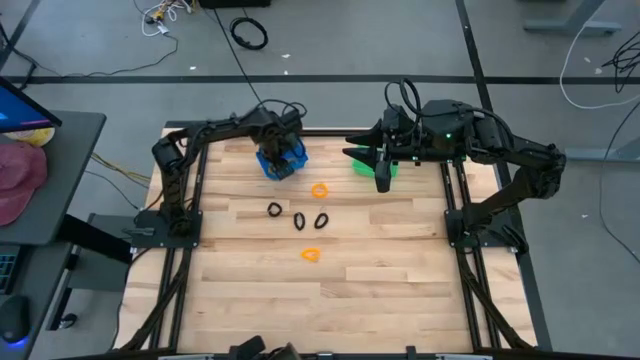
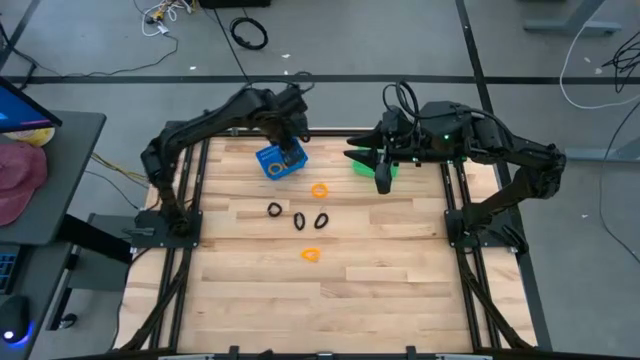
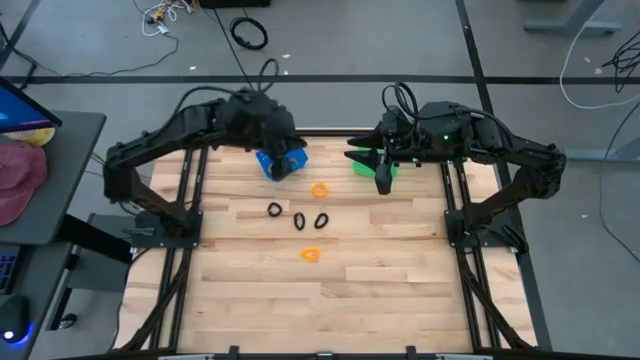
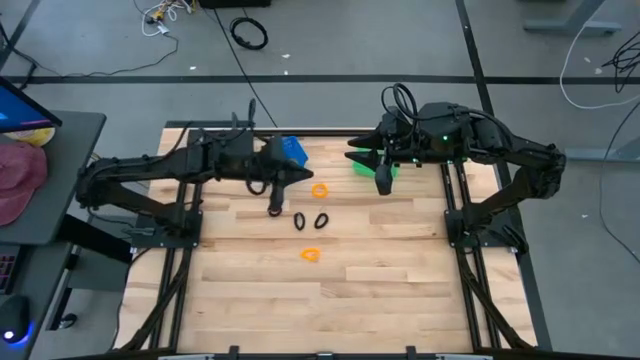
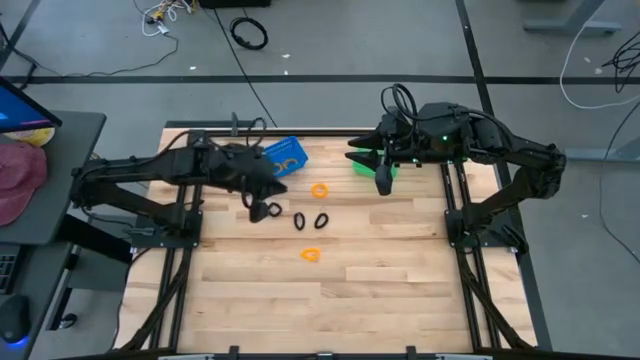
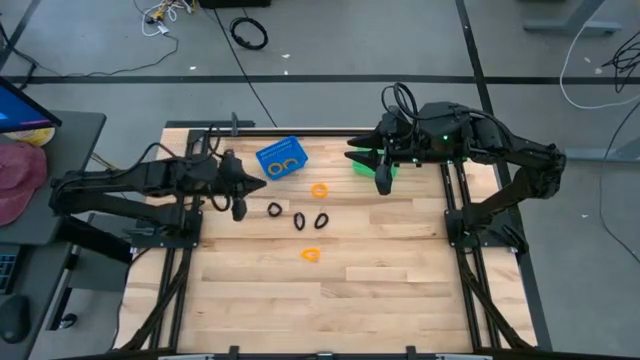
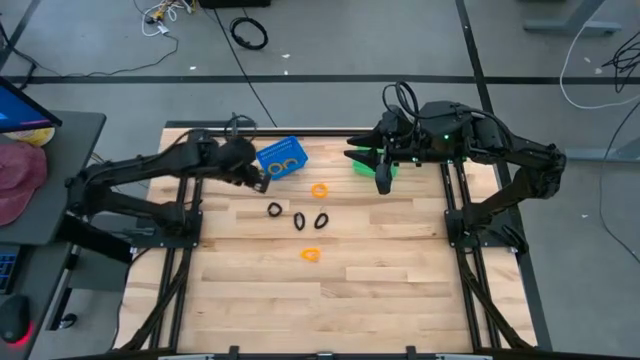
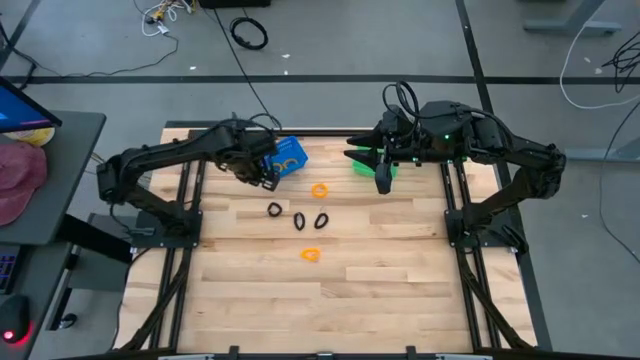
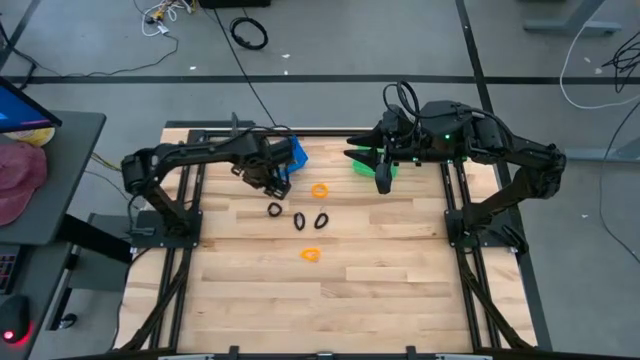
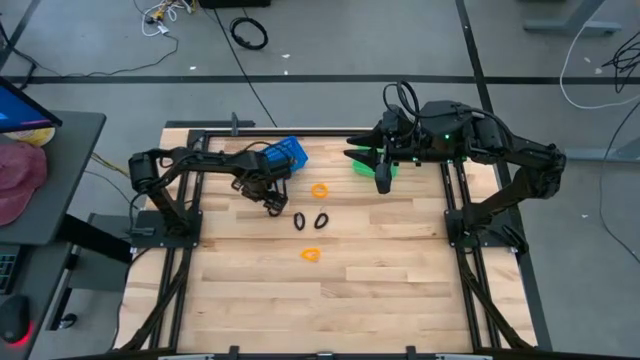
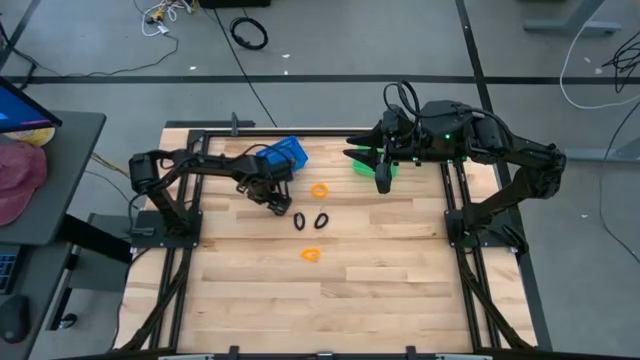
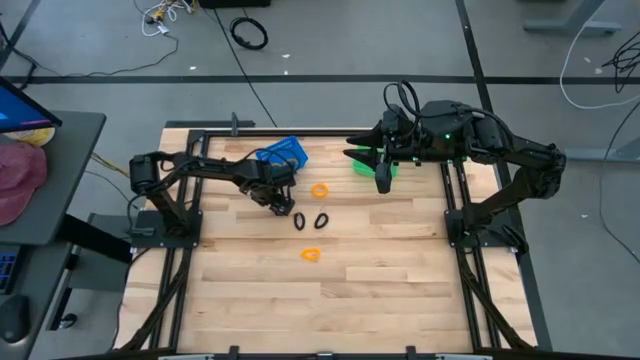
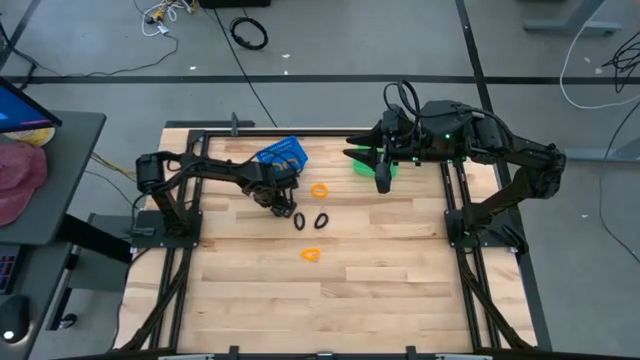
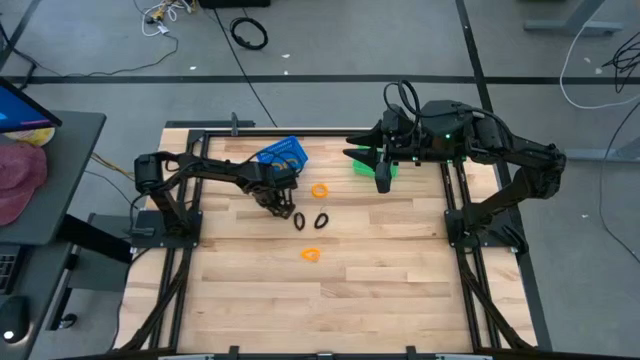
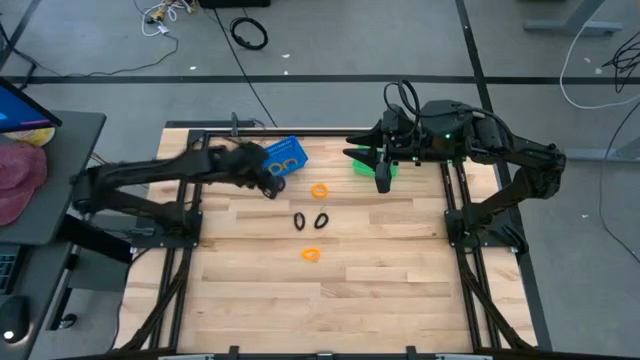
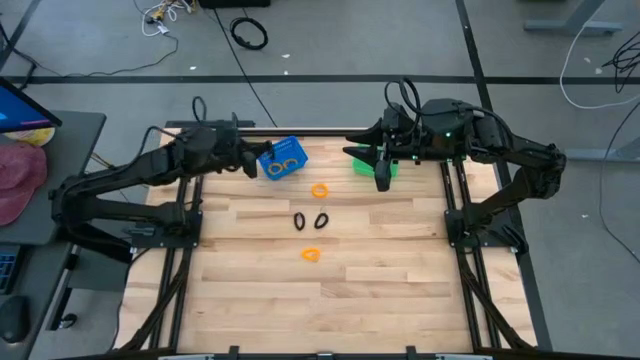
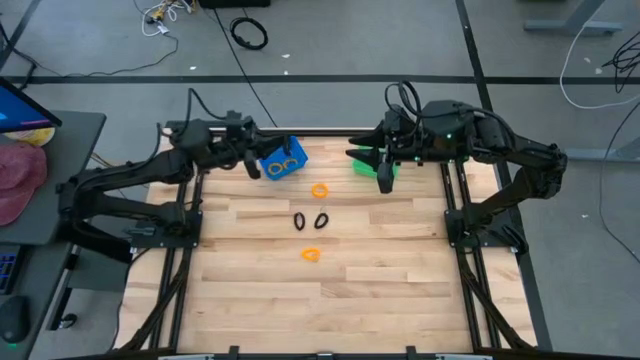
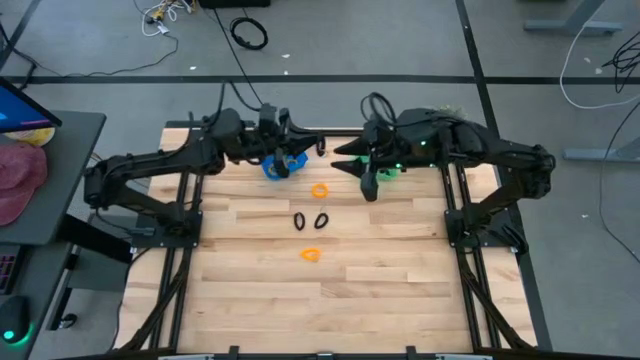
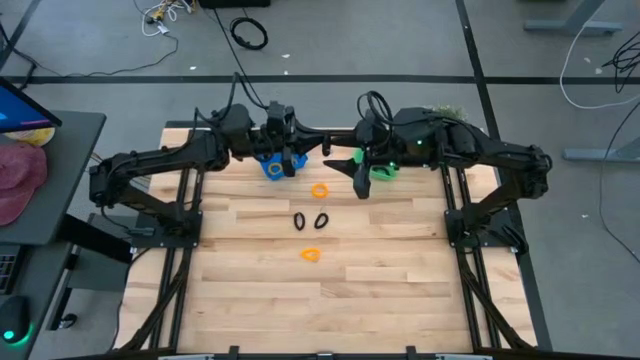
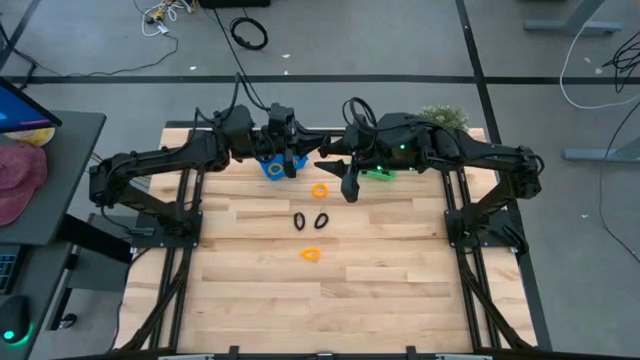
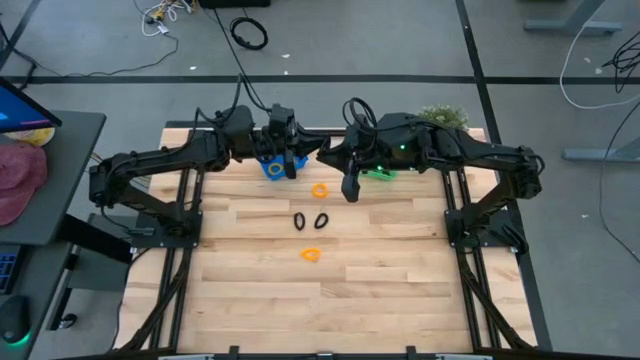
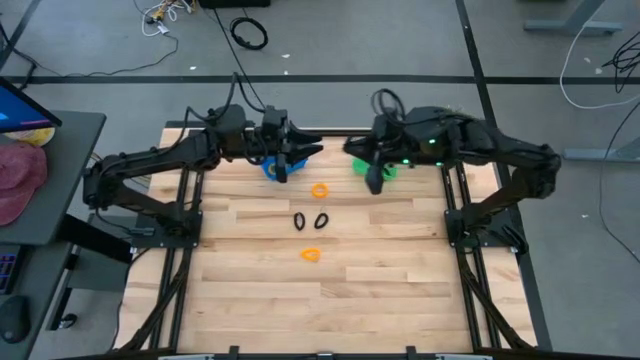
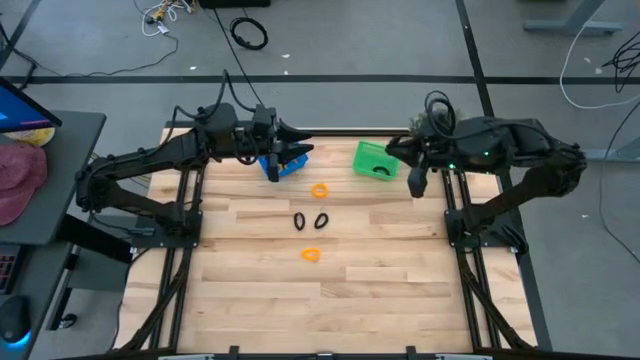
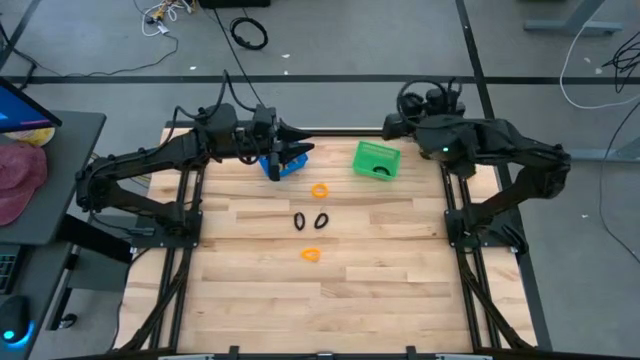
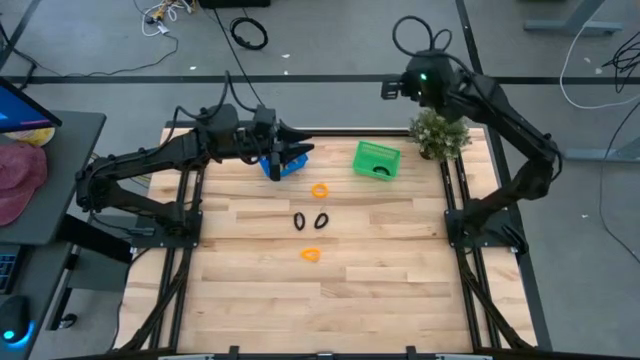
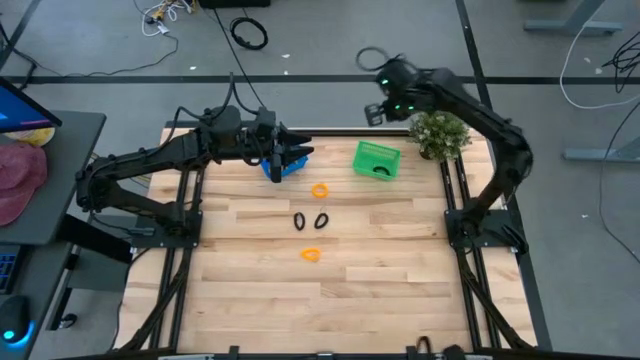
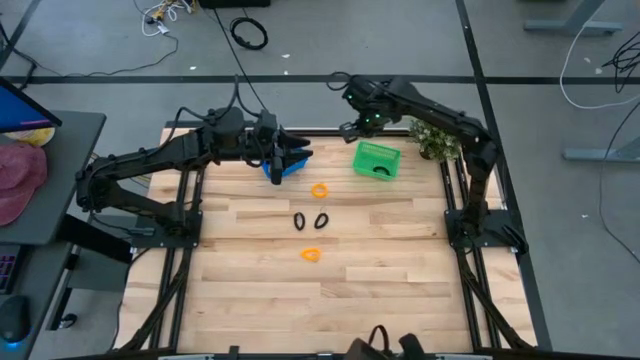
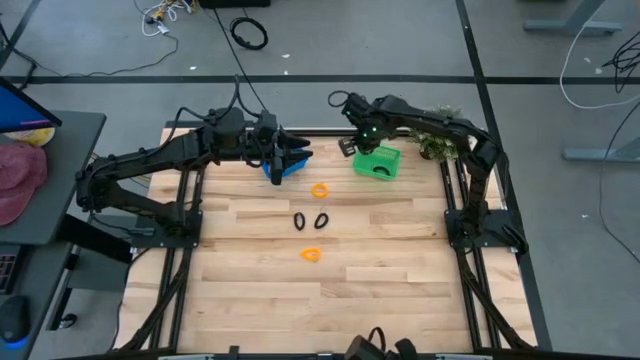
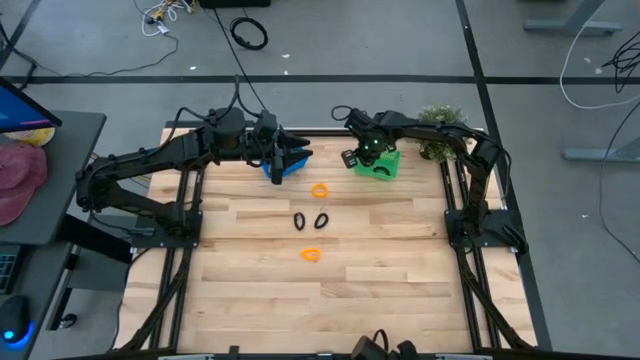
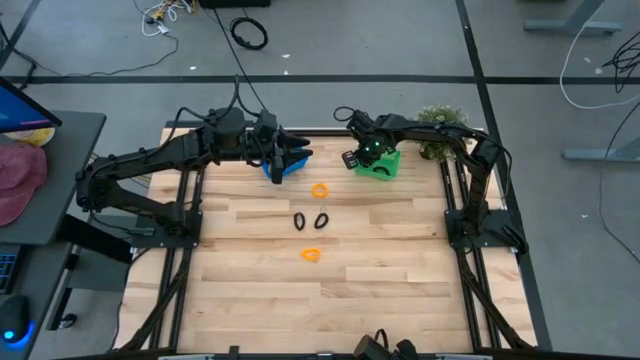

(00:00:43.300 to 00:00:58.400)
Task: Sort spring keychains
Put the black spring keychain into the green bin

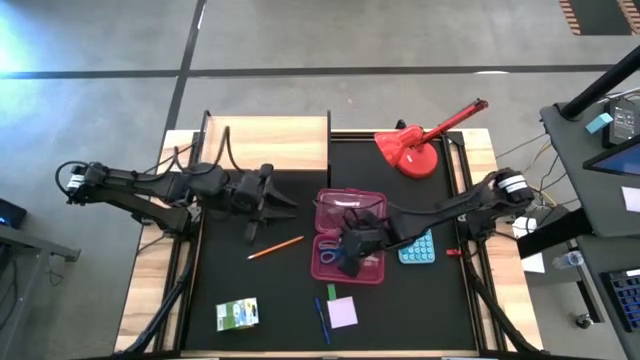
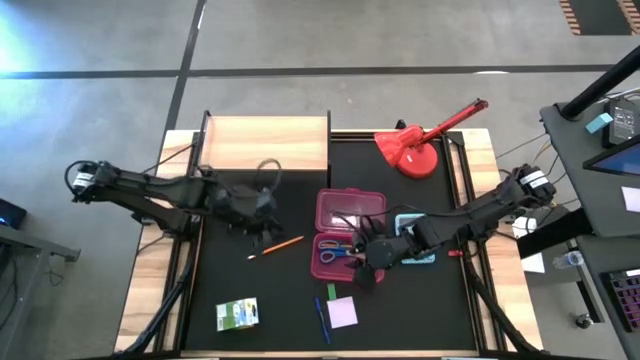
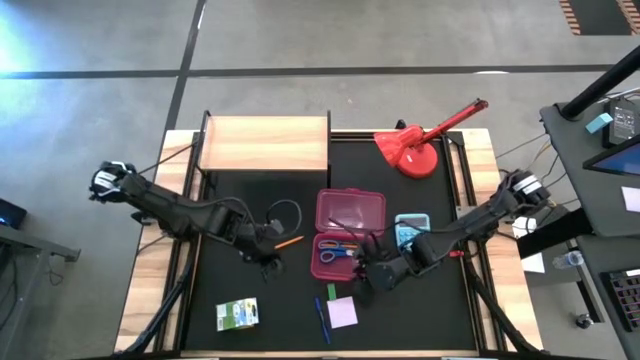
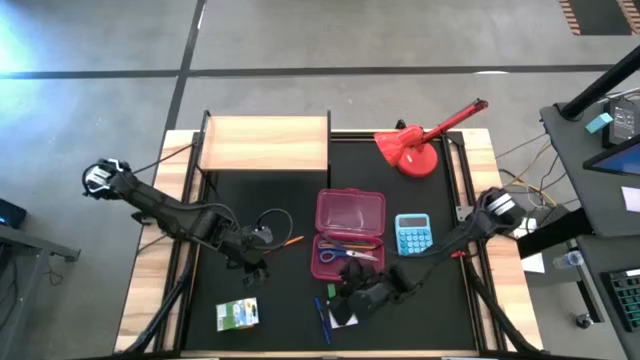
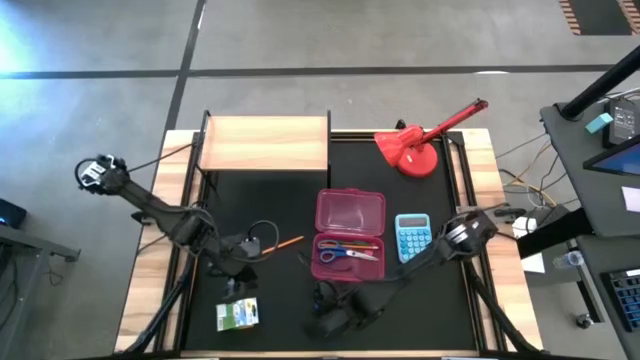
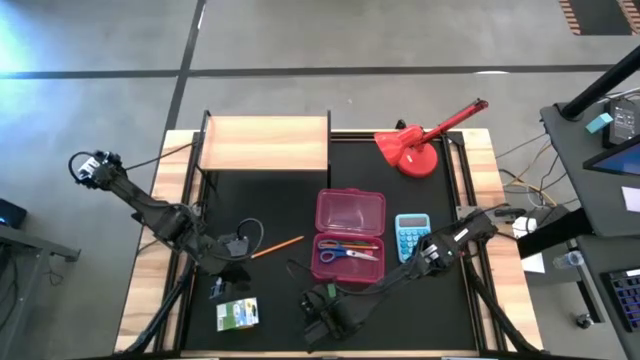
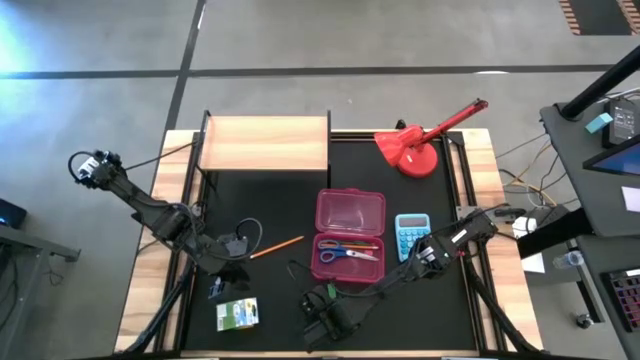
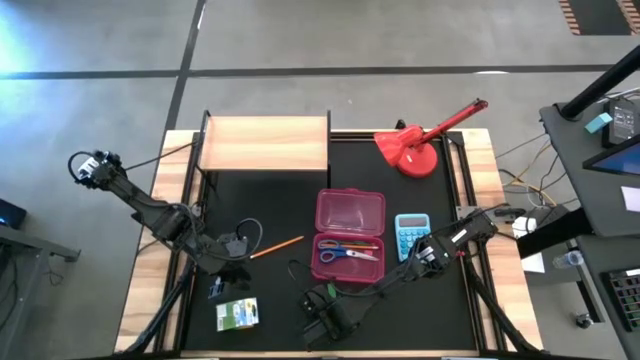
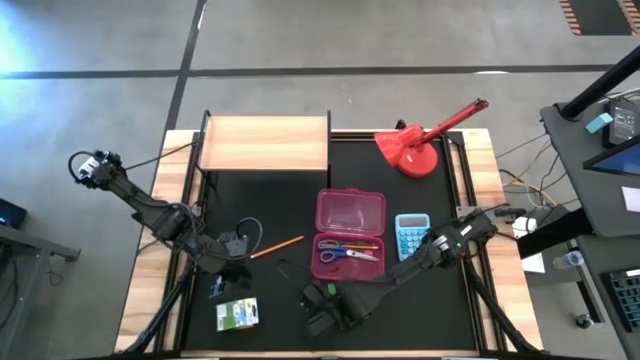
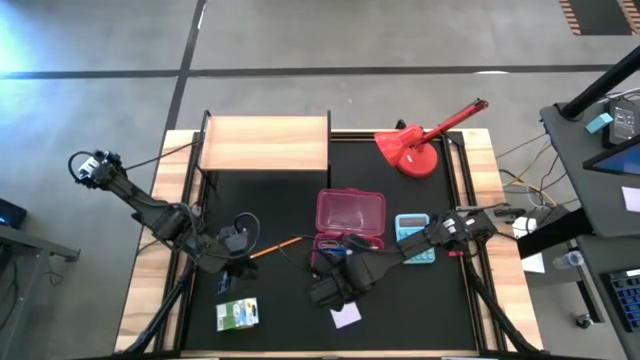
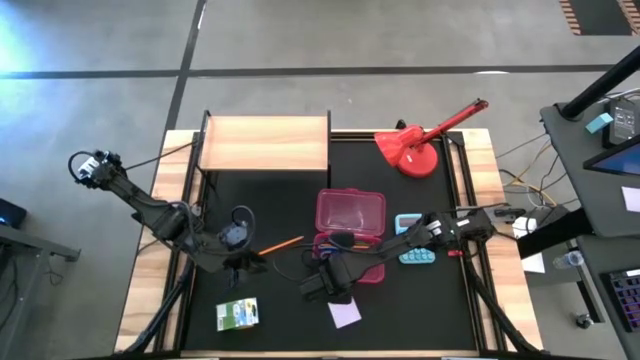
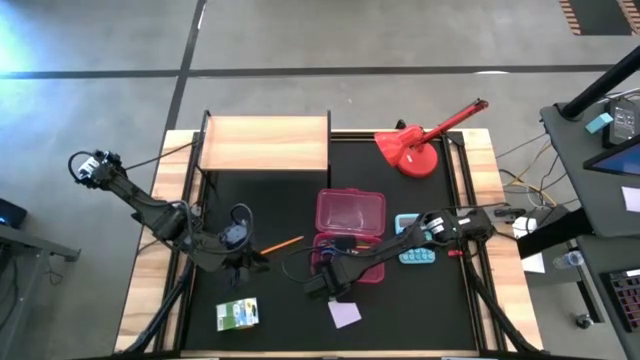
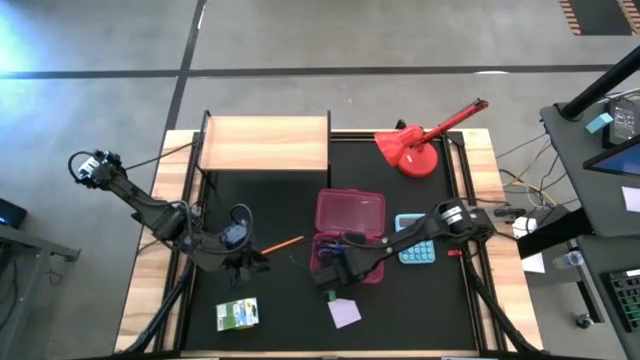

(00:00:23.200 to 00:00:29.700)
Task: Pack school essentials
Put the blue pen into the pink supply box
